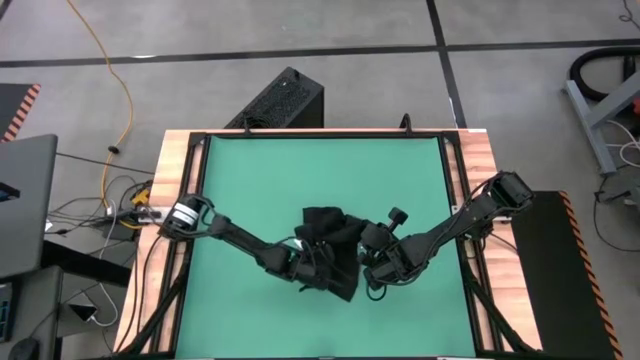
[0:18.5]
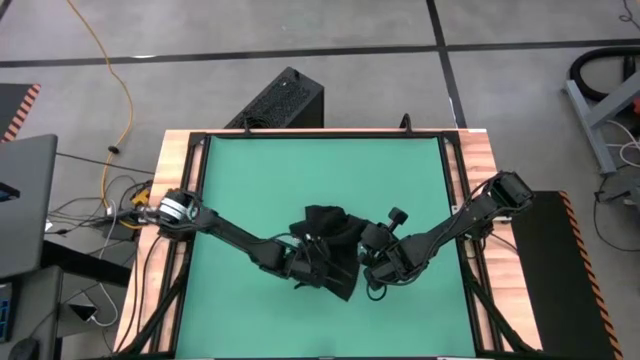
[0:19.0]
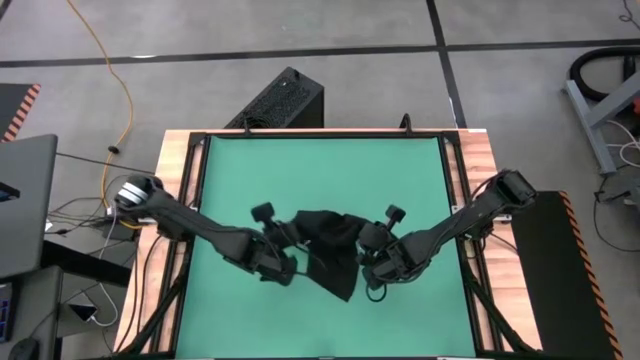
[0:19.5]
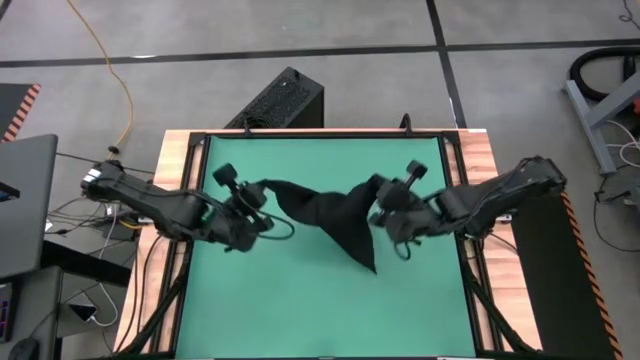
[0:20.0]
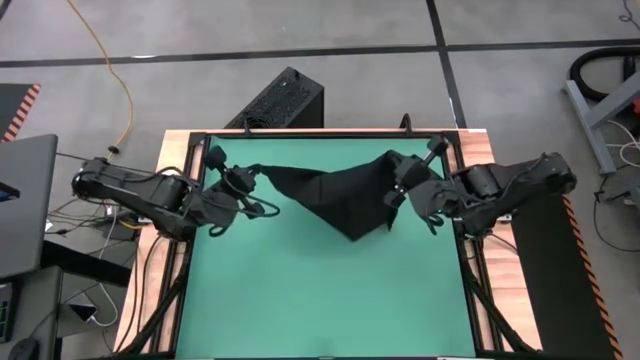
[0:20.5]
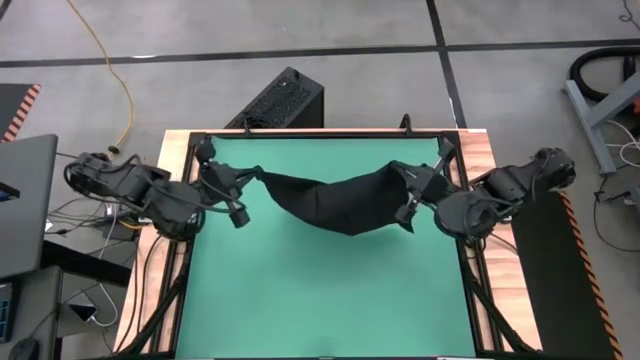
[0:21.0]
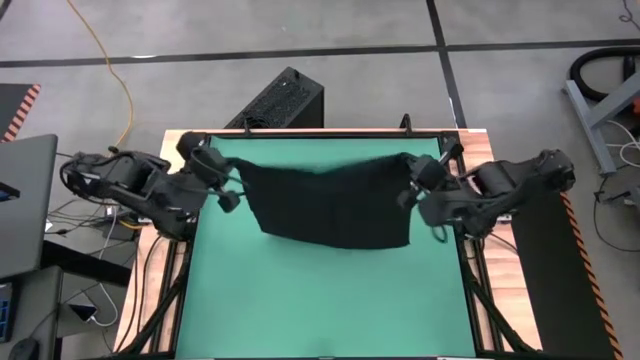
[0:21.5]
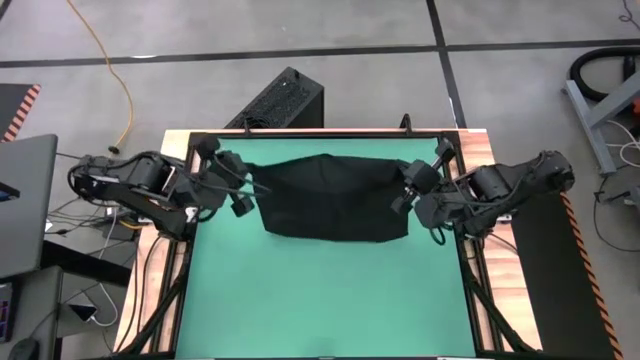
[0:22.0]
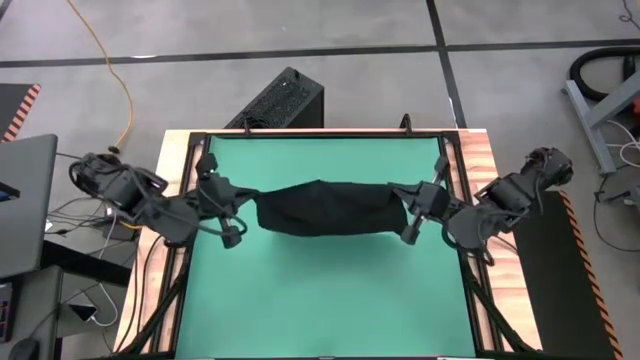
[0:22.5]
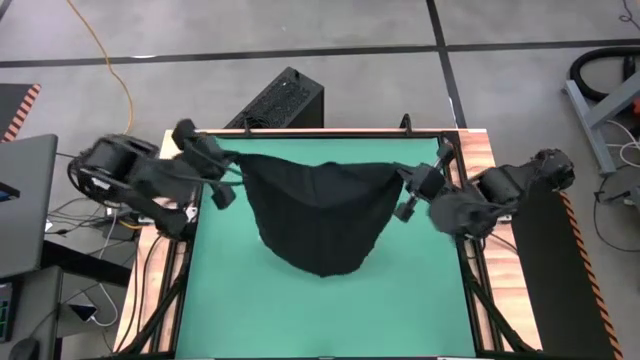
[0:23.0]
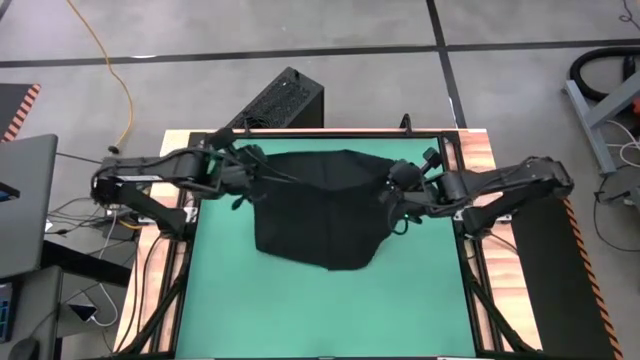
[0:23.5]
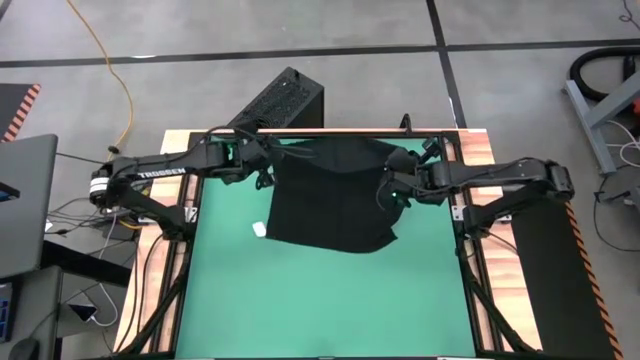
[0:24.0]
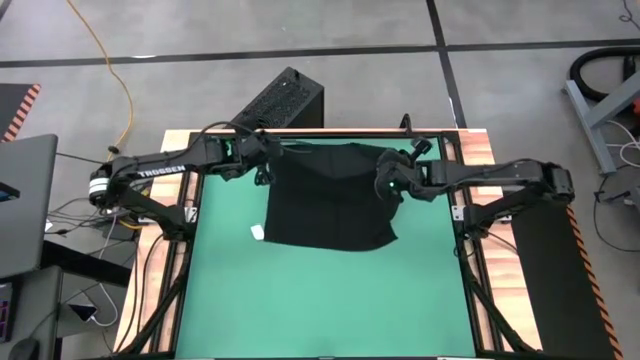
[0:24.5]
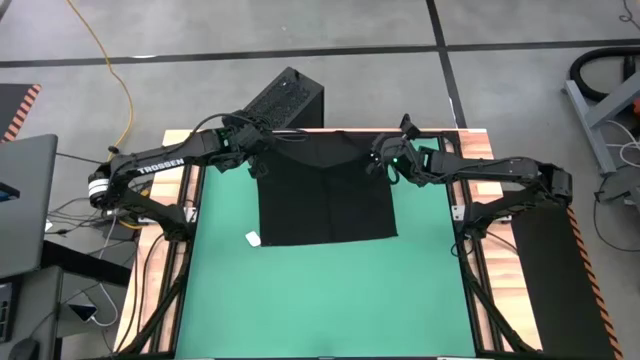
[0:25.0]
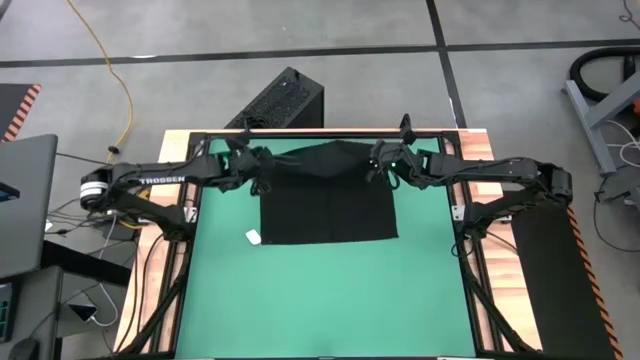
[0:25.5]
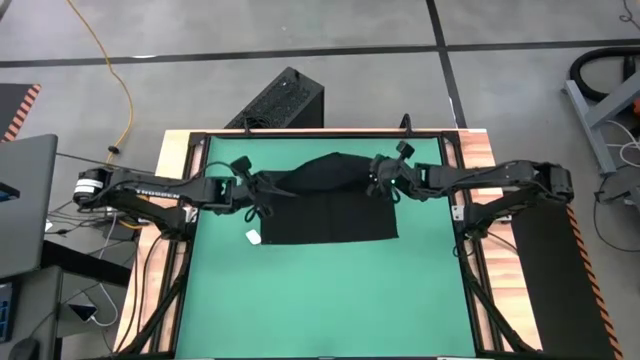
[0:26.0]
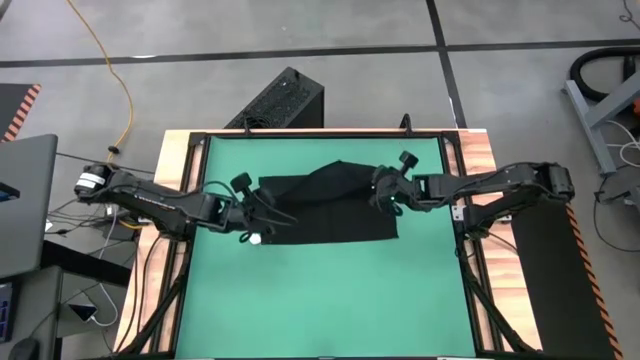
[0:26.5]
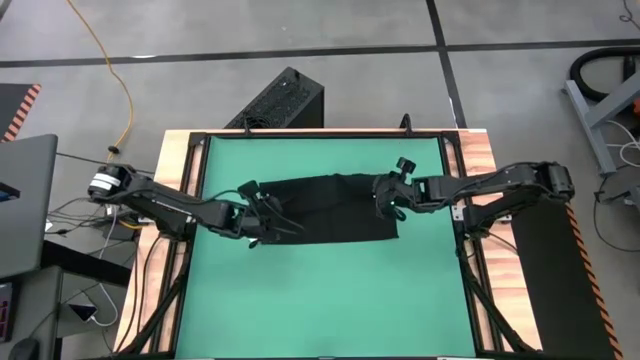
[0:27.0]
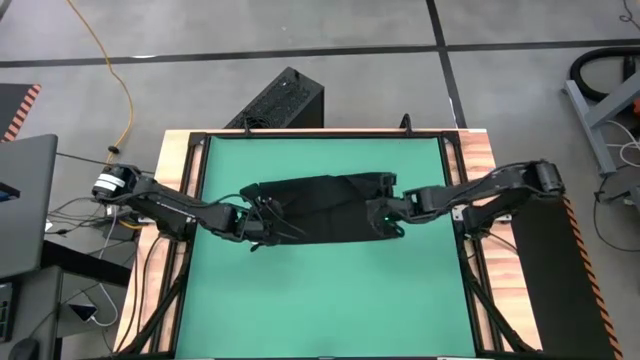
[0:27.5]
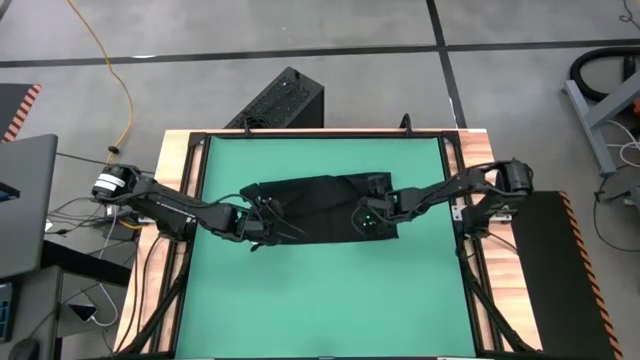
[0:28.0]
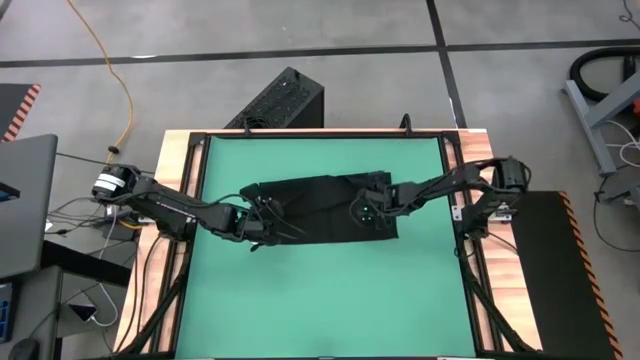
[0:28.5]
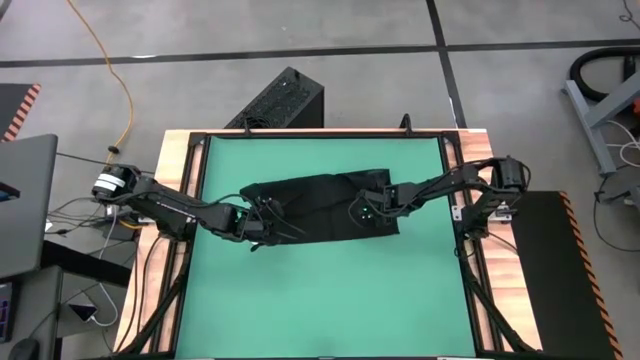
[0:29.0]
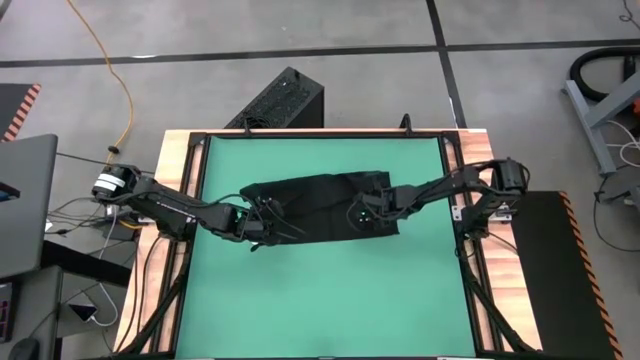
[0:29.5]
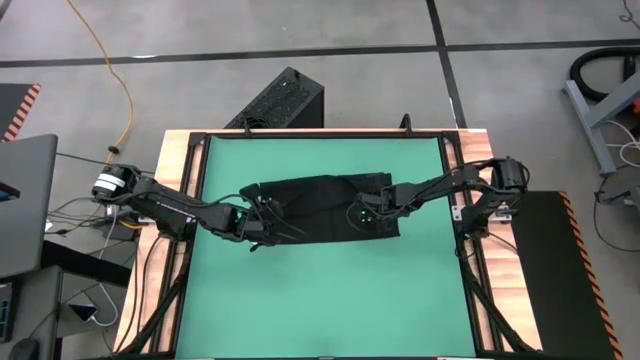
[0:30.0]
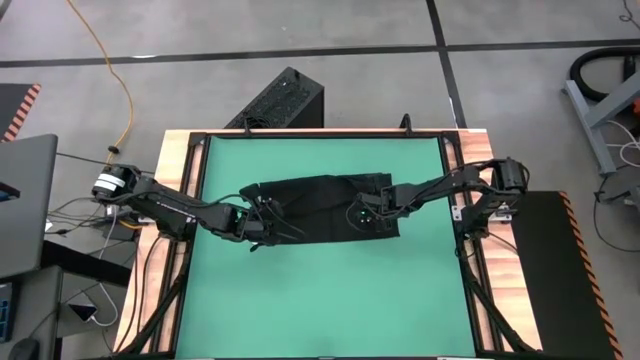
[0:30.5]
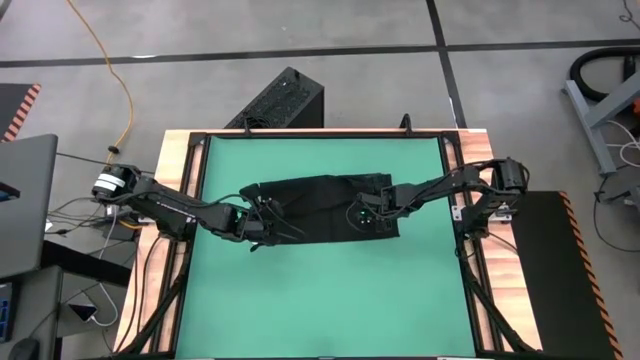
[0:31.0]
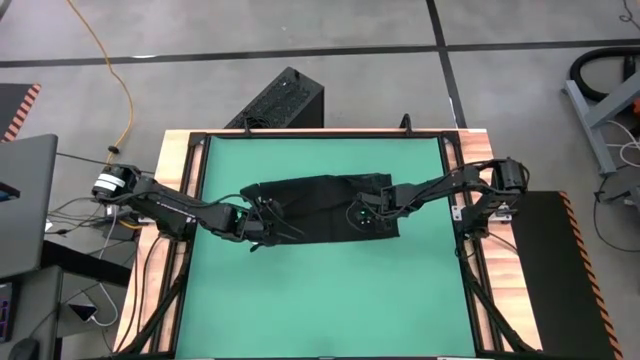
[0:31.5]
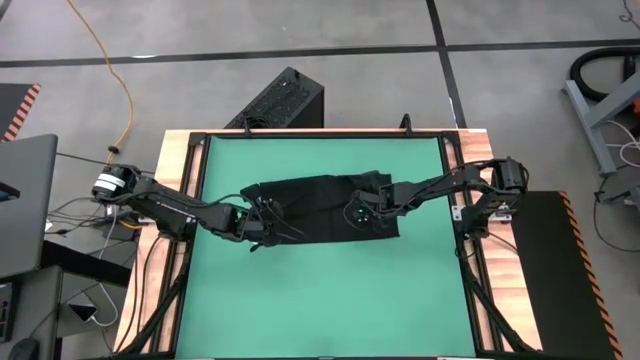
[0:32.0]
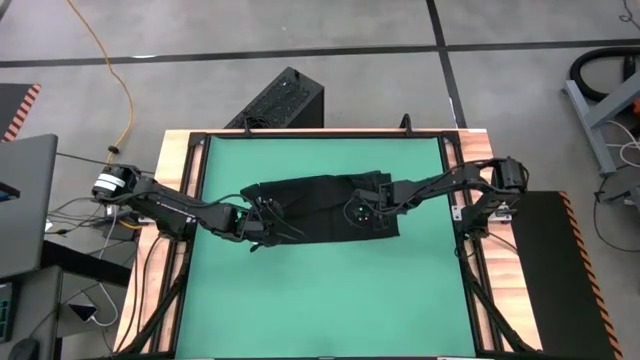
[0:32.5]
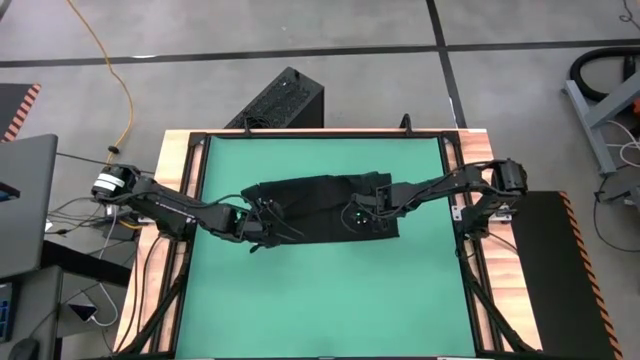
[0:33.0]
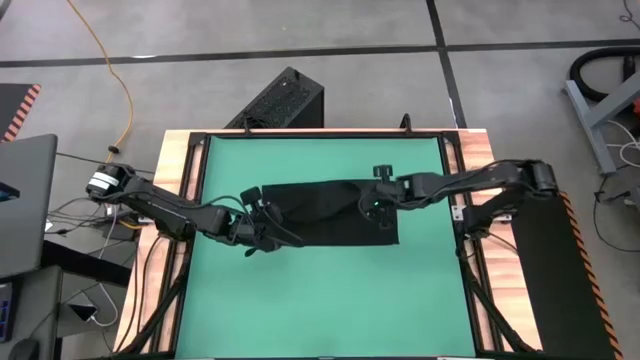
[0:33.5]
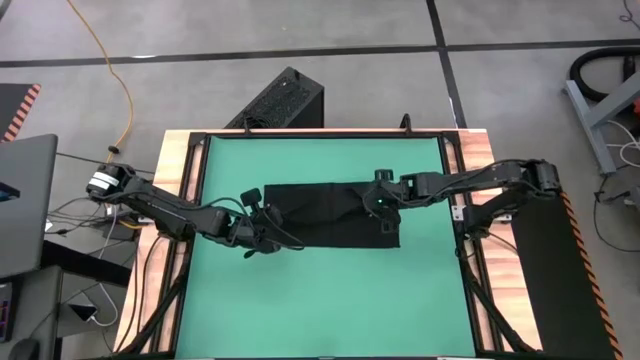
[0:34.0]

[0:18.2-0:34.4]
Task: Roll towel into tight, uniform cylinder
Roll the black towel
